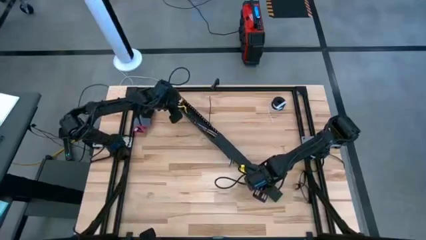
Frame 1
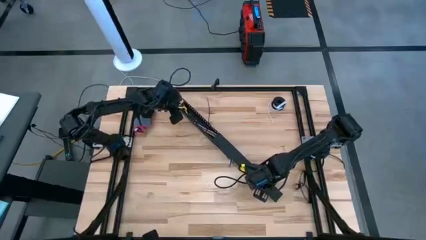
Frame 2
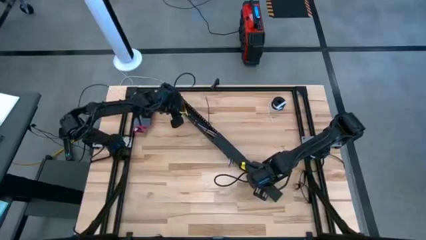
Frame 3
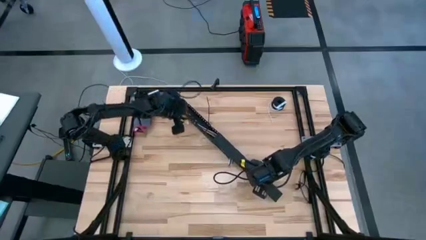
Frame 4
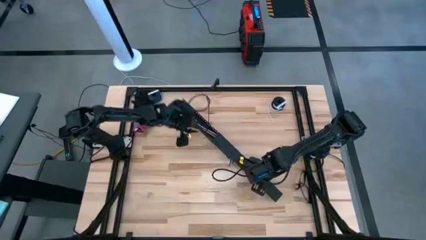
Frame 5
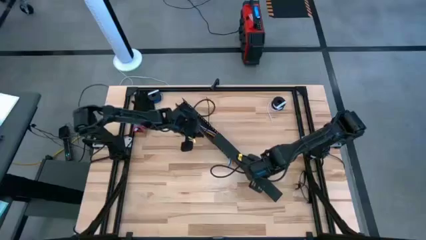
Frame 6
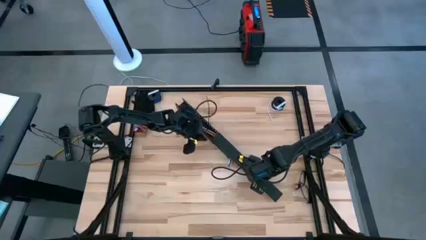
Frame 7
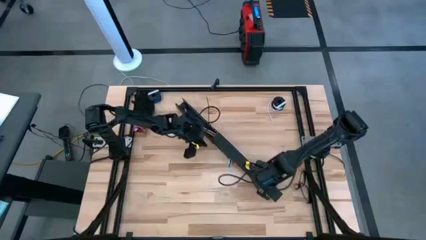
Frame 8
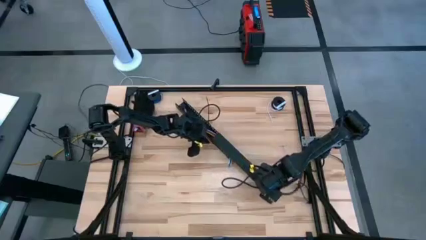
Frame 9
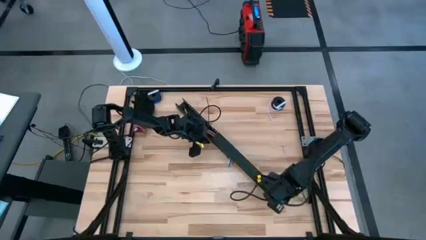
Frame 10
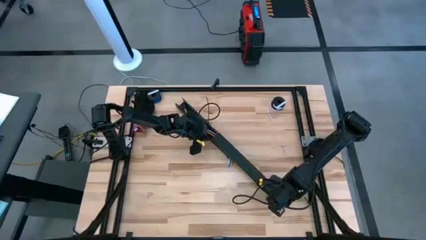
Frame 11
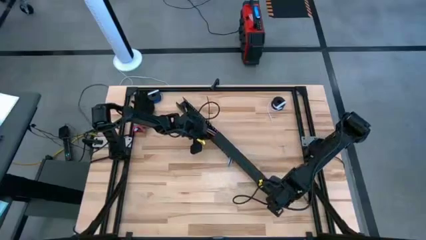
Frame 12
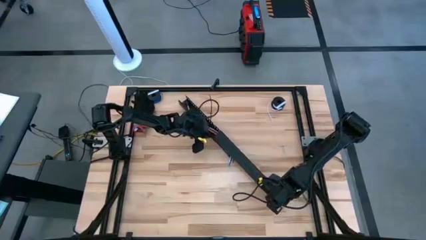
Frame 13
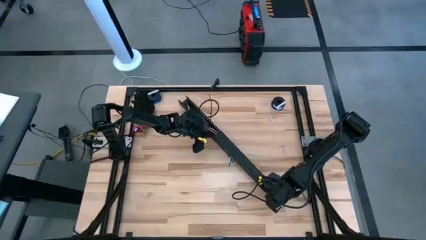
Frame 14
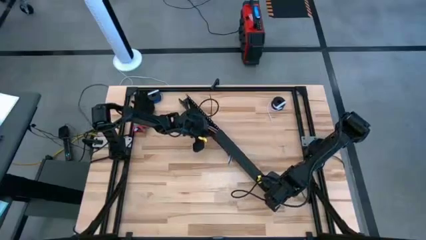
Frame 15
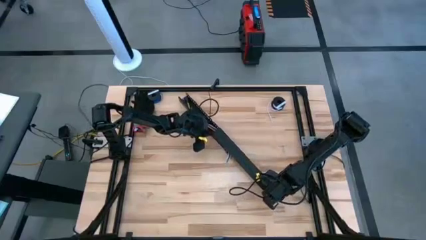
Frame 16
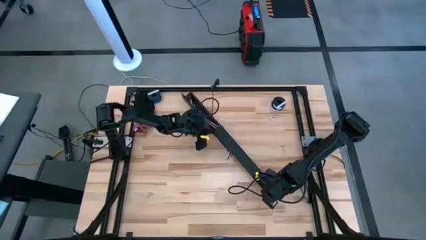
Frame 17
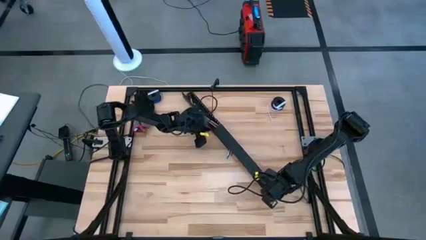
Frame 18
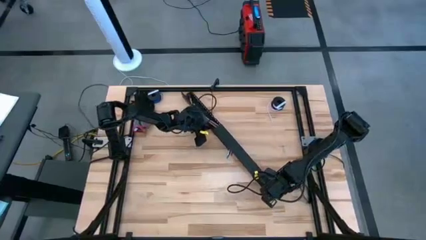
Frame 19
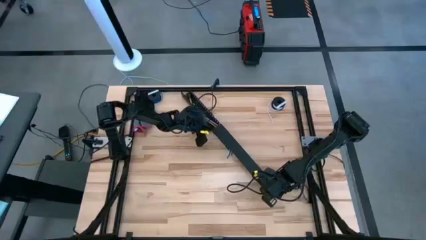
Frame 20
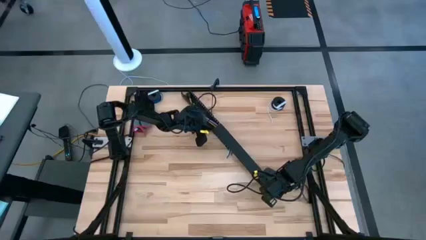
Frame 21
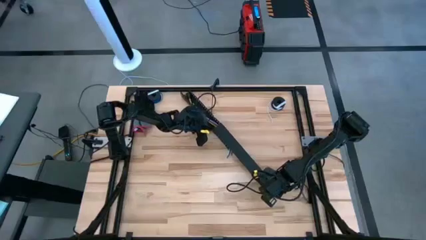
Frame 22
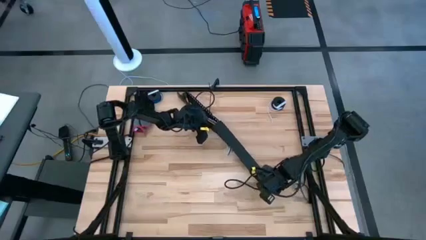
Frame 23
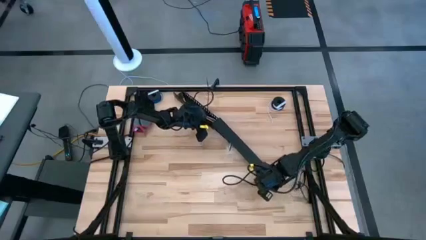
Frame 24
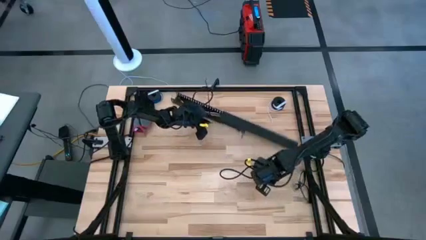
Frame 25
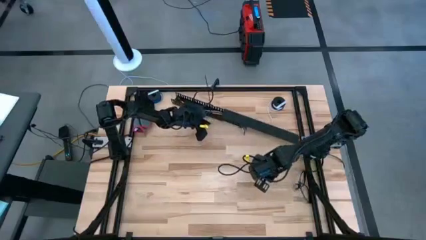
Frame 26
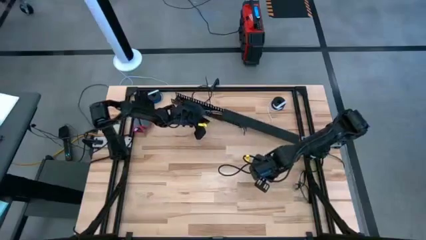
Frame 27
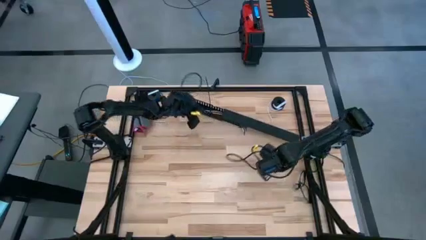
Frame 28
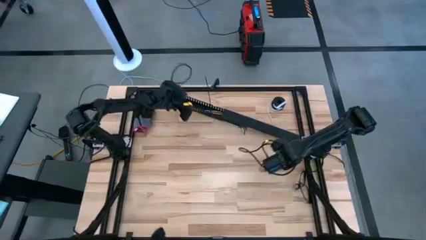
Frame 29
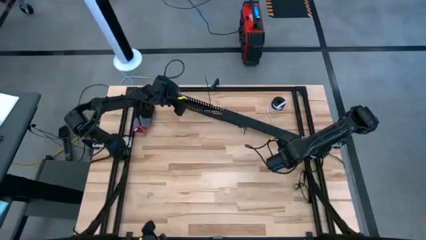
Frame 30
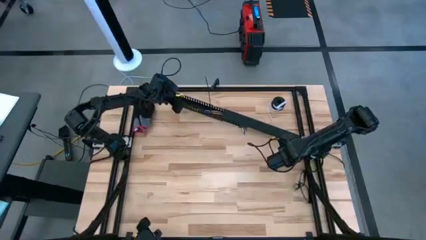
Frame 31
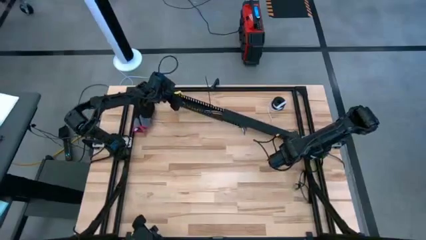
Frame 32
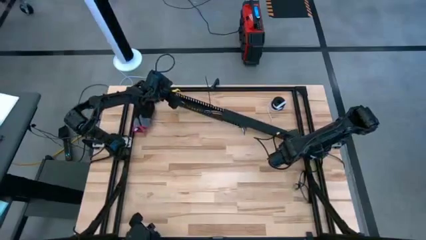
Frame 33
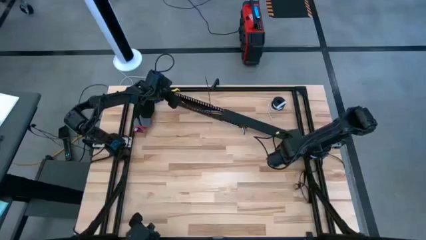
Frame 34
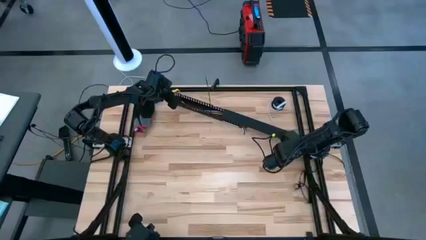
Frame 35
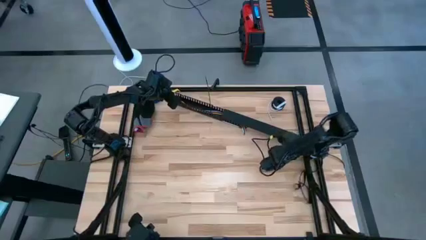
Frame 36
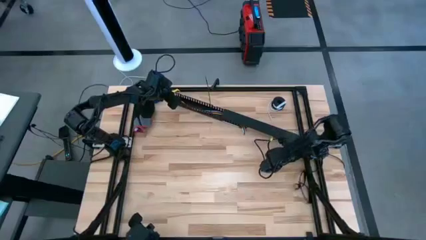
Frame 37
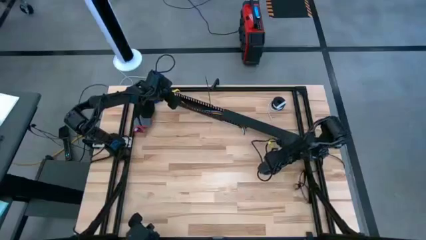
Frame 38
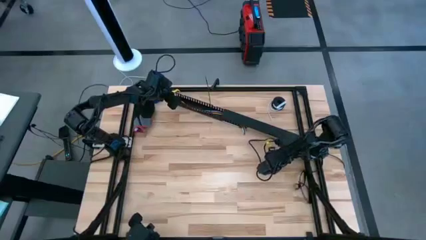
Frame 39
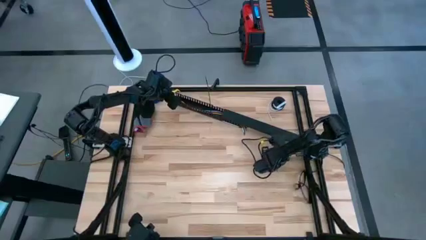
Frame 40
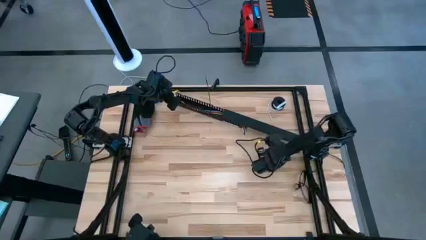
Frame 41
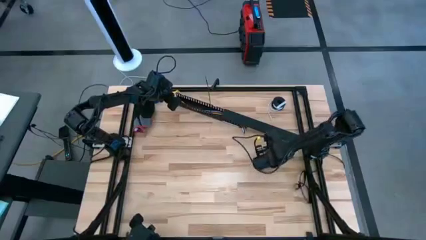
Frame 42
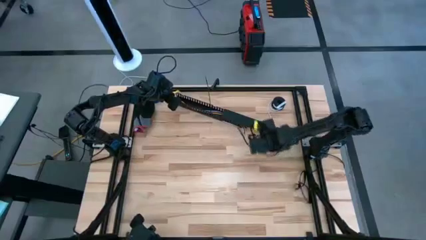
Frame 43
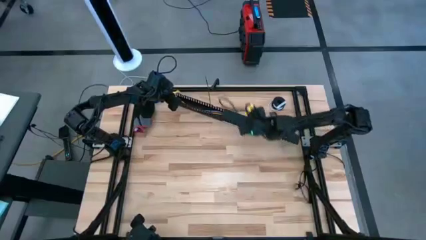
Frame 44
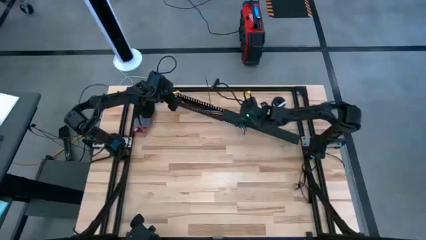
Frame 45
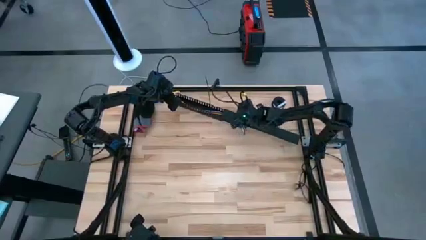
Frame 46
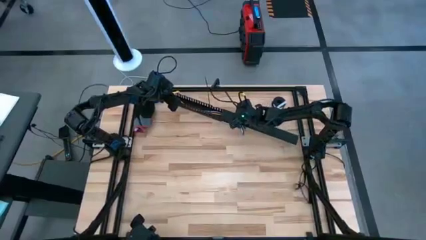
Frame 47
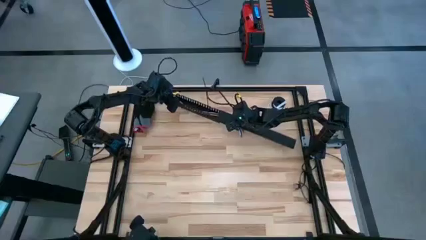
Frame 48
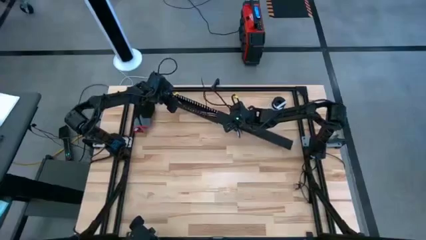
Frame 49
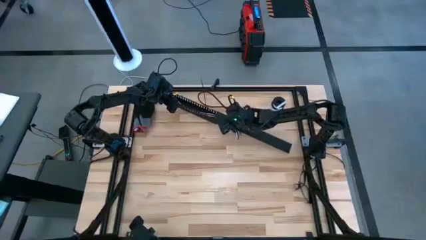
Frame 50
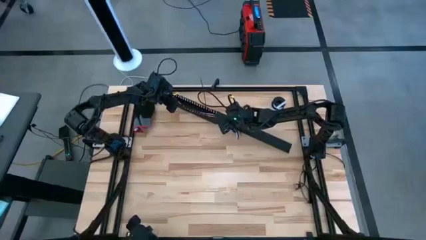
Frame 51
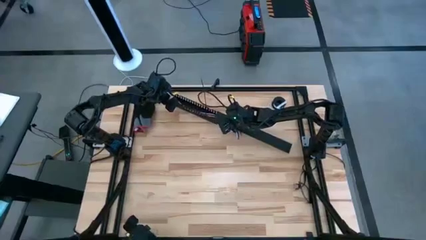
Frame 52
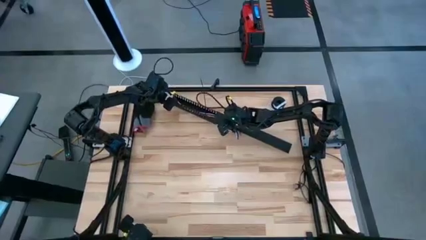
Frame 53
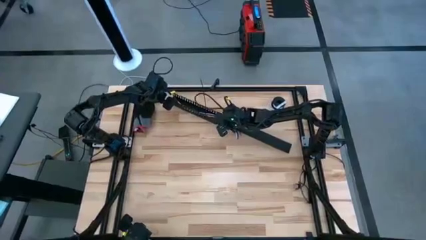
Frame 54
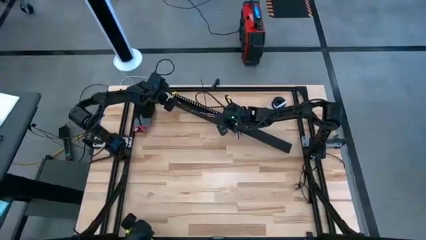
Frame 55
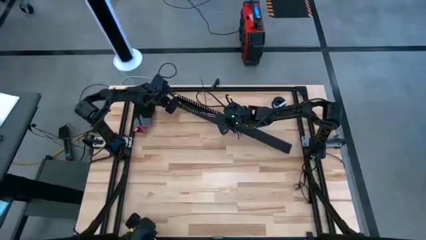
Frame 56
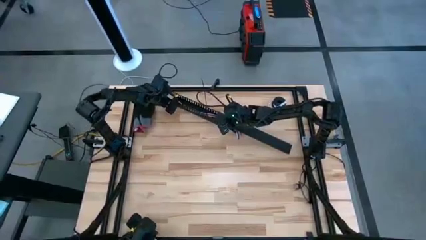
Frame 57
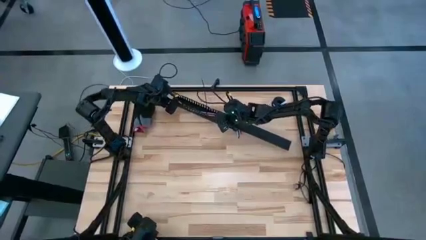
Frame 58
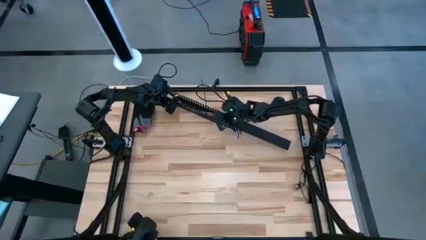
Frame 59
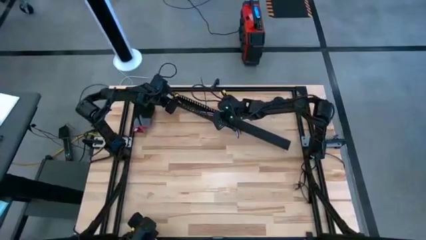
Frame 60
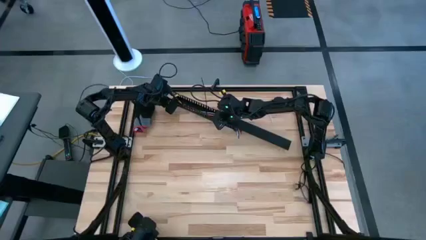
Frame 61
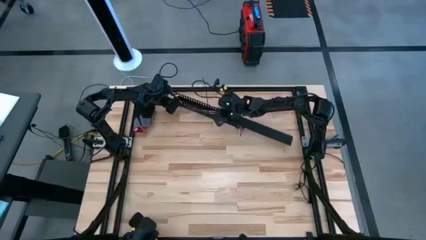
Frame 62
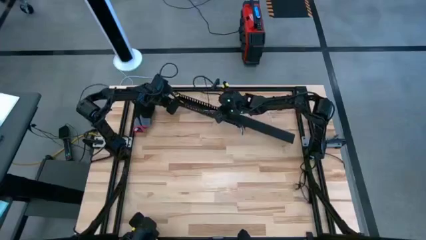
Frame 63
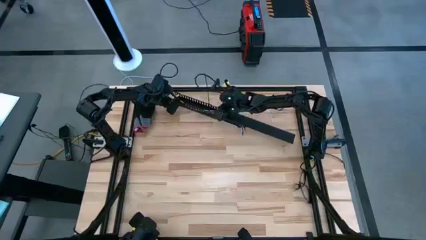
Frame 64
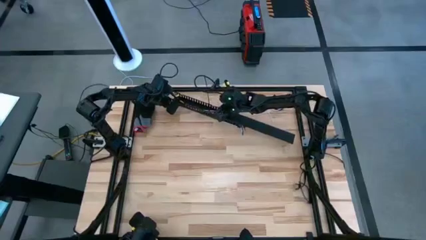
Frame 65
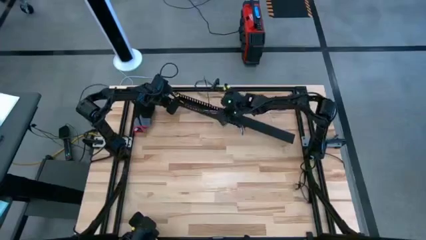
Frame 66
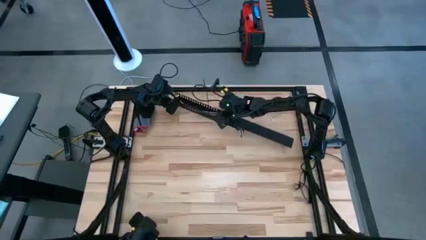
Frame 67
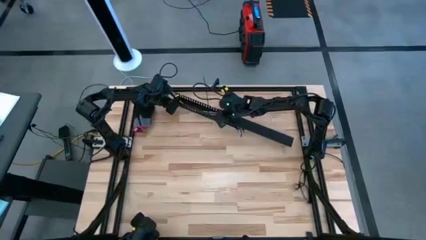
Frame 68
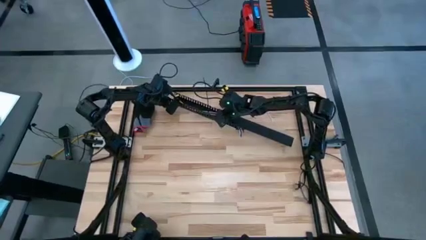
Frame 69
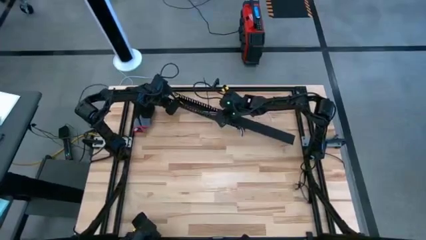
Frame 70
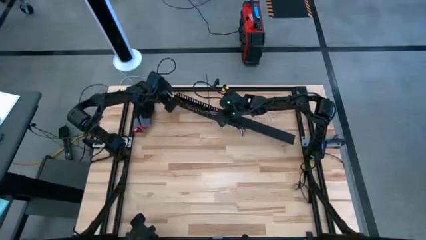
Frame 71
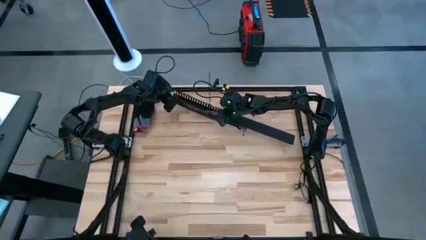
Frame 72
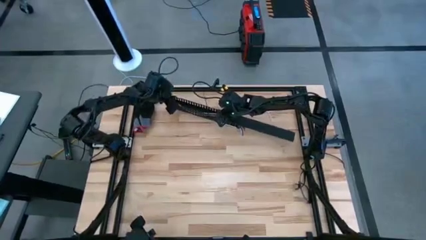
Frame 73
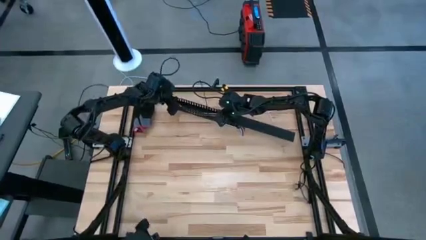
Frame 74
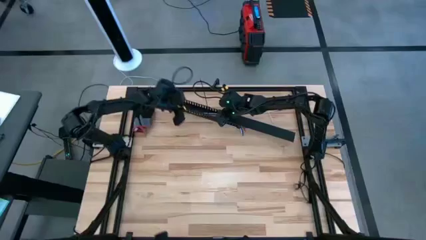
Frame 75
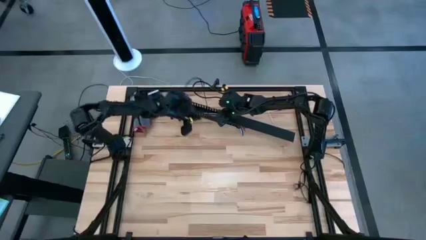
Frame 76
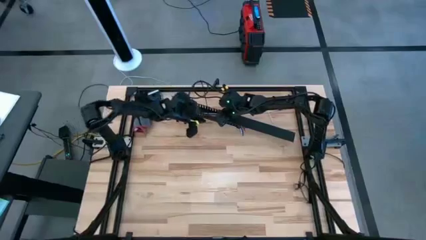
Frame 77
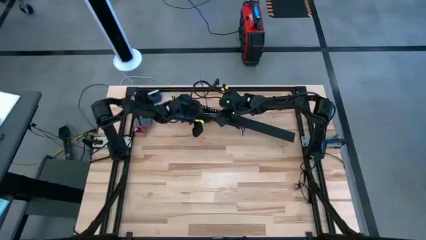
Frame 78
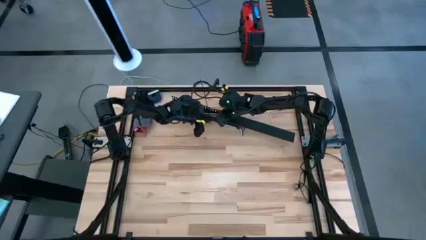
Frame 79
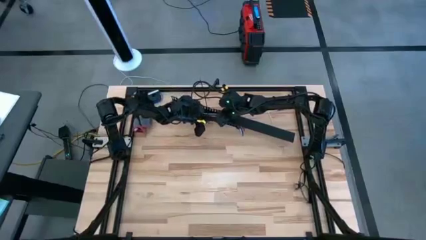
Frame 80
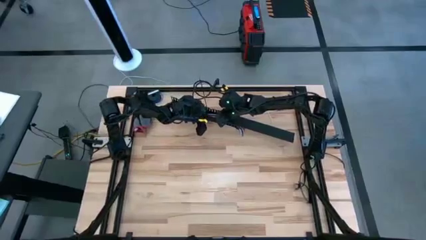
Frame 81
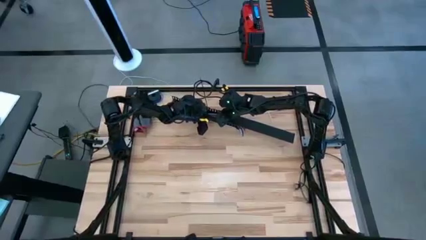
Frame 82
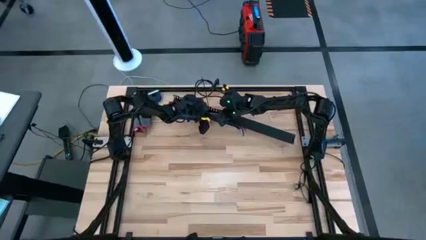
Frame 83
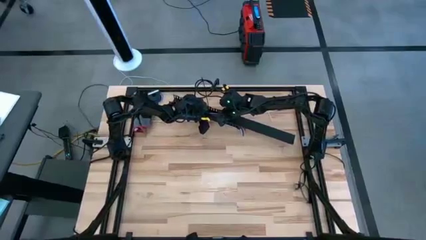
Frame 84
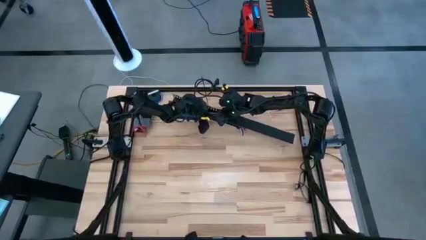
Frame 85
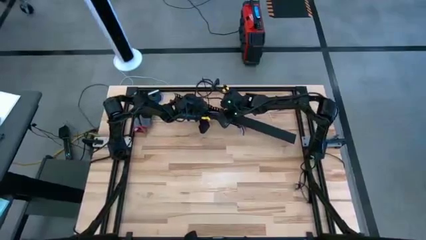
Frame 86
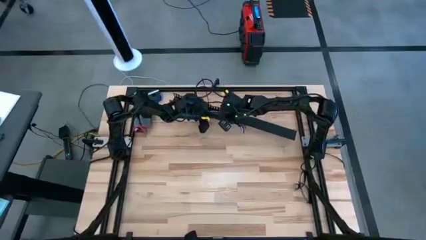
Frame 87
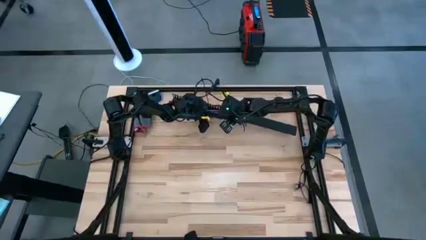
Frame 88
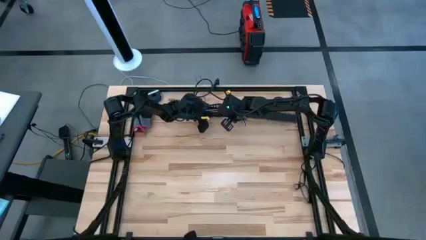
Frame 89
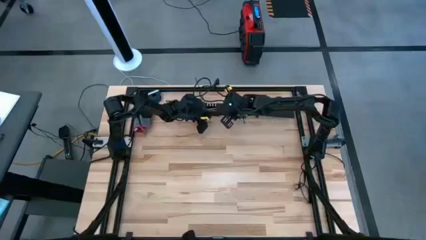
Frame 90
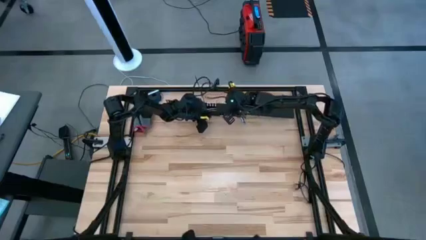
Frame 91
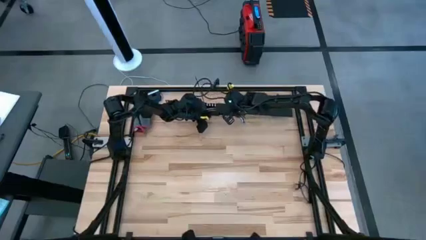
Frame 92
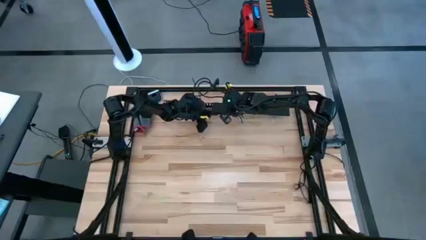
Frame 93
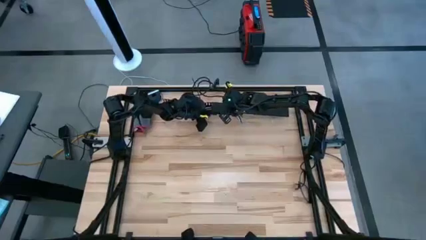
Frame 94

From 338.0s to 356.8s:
Task: Ziptie cables
Close the black cable duct
